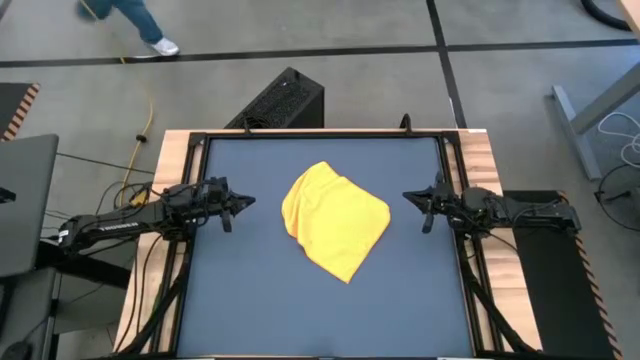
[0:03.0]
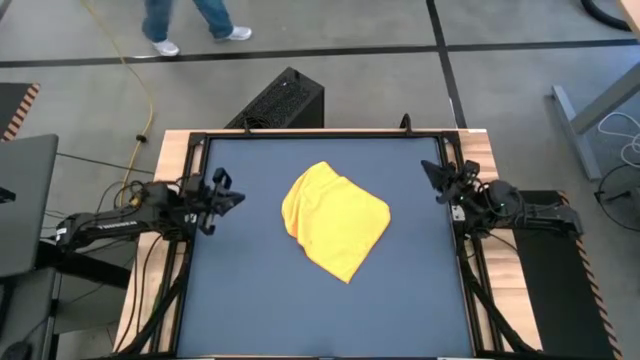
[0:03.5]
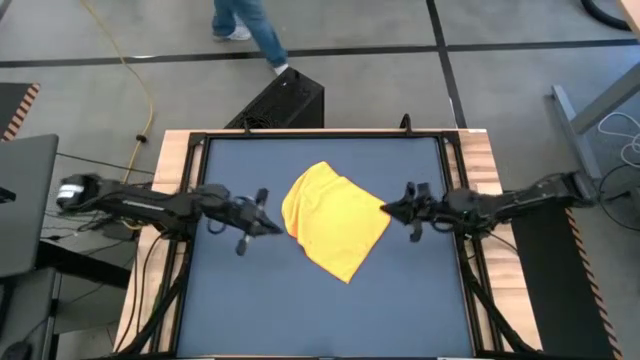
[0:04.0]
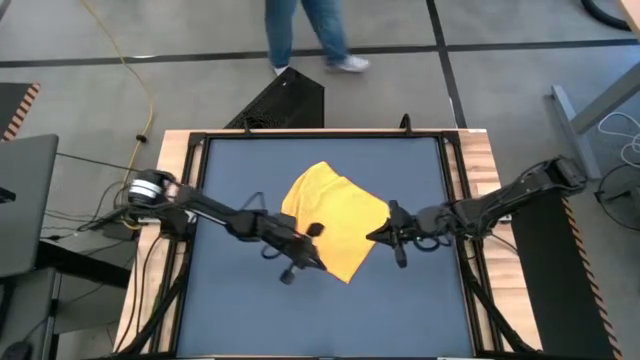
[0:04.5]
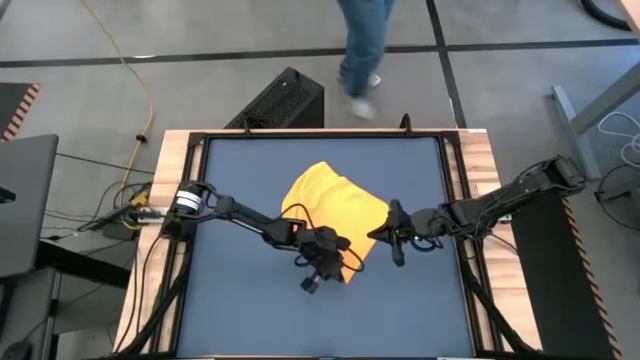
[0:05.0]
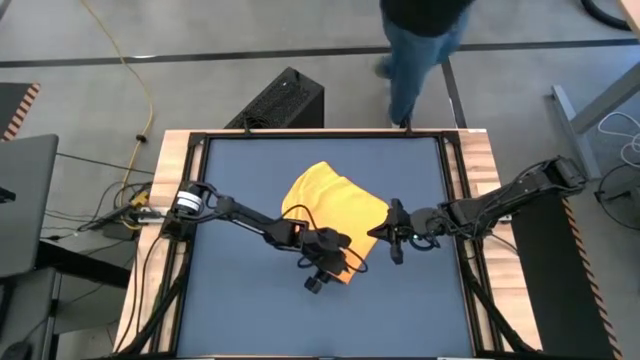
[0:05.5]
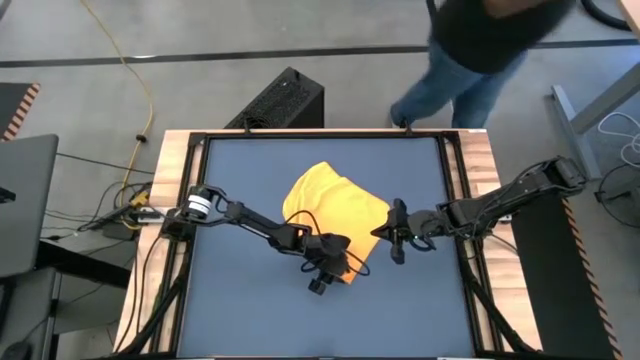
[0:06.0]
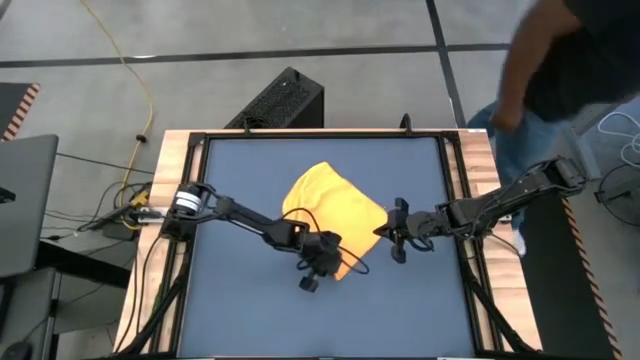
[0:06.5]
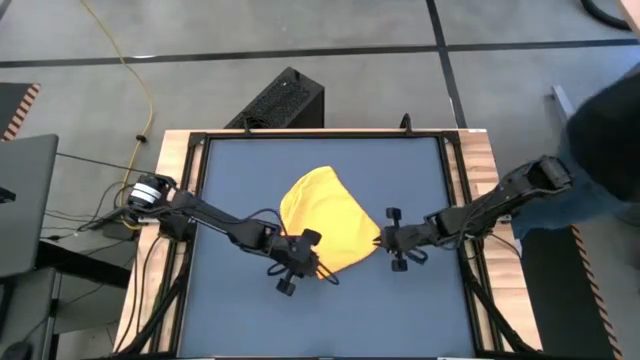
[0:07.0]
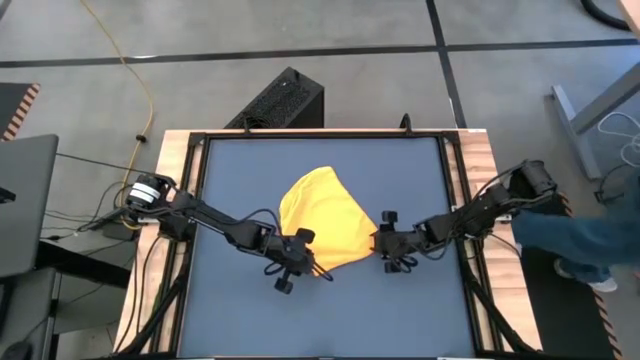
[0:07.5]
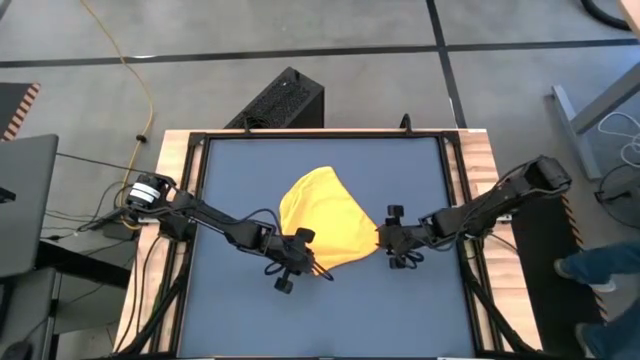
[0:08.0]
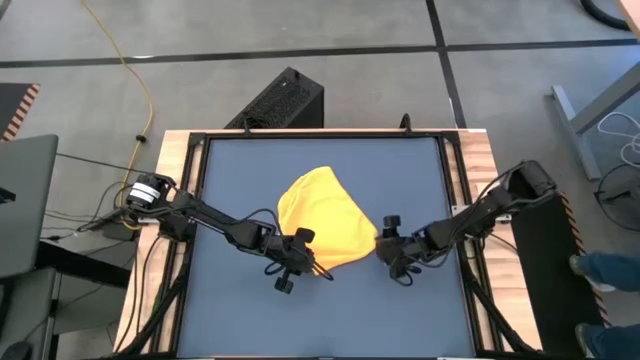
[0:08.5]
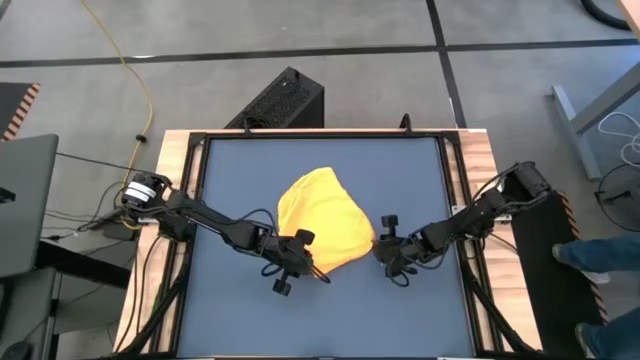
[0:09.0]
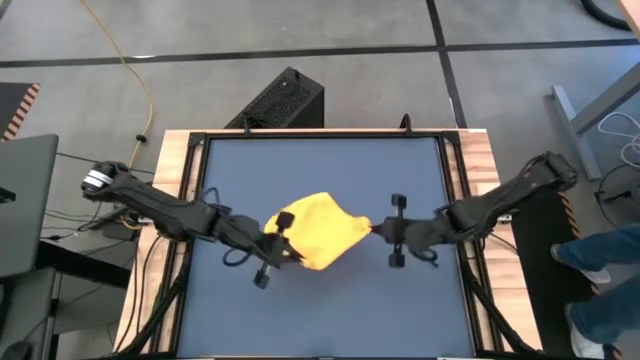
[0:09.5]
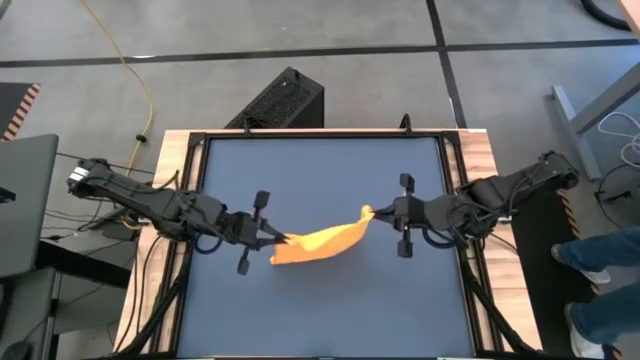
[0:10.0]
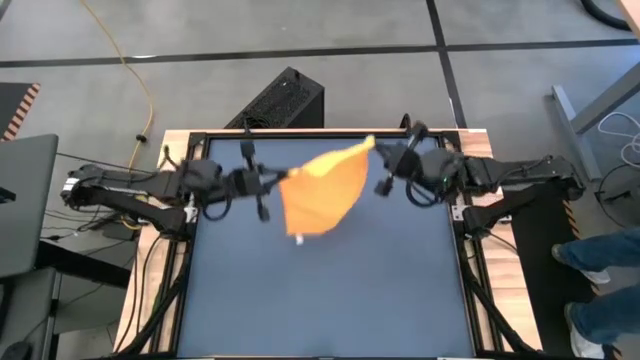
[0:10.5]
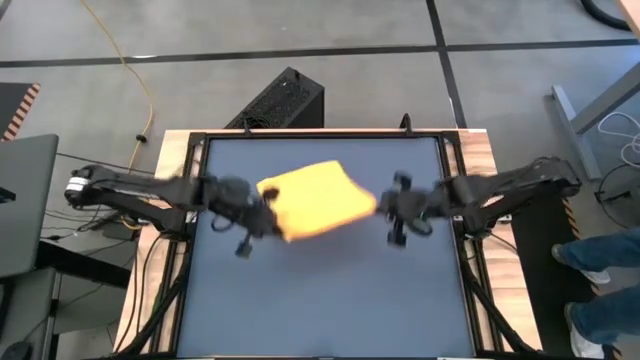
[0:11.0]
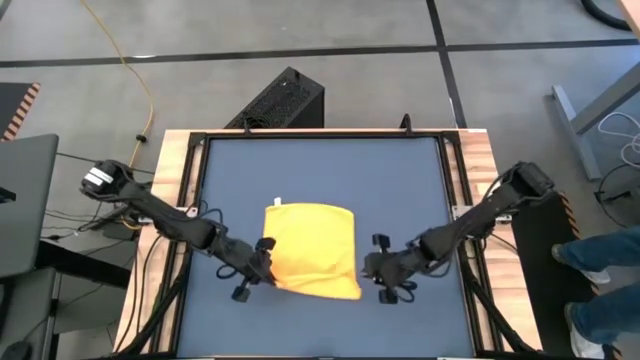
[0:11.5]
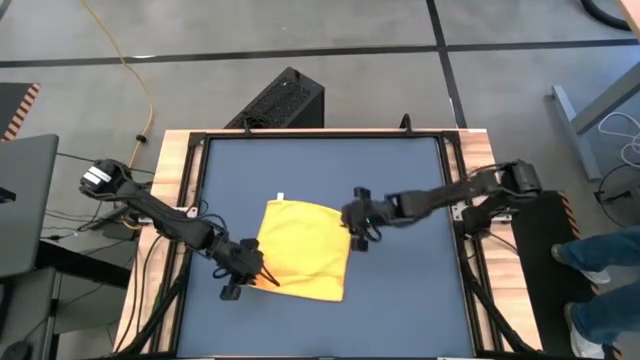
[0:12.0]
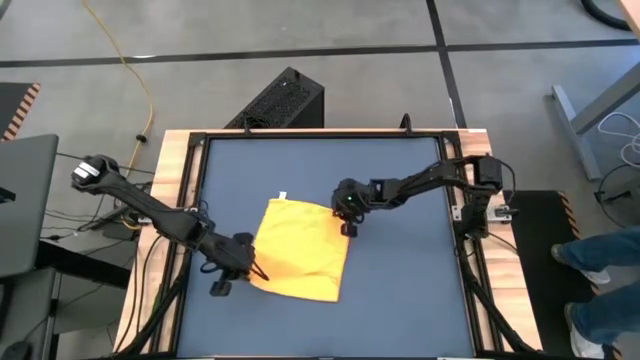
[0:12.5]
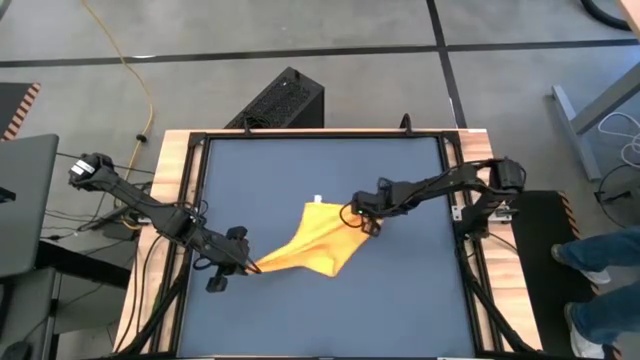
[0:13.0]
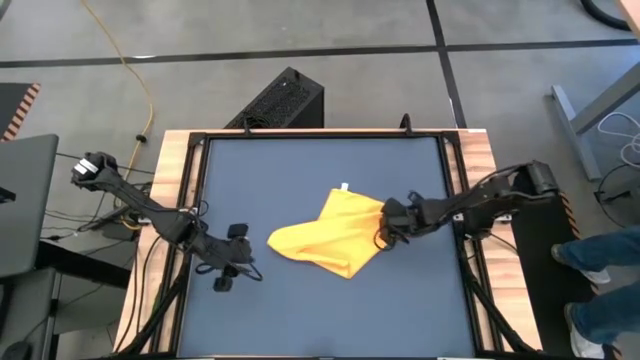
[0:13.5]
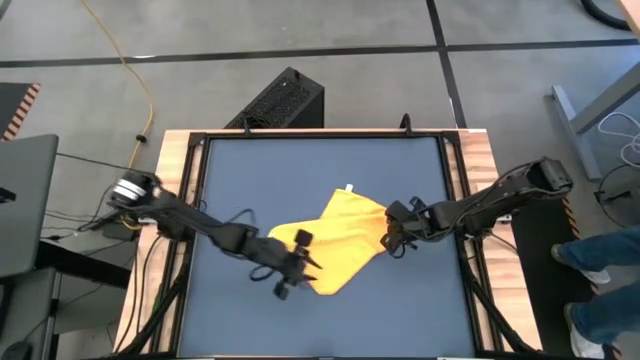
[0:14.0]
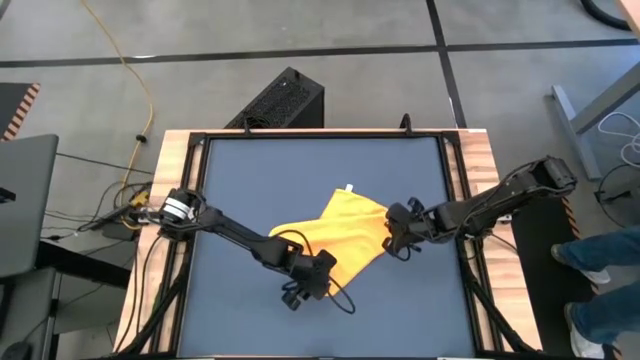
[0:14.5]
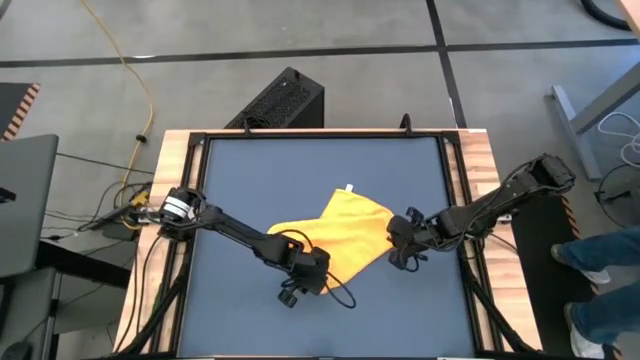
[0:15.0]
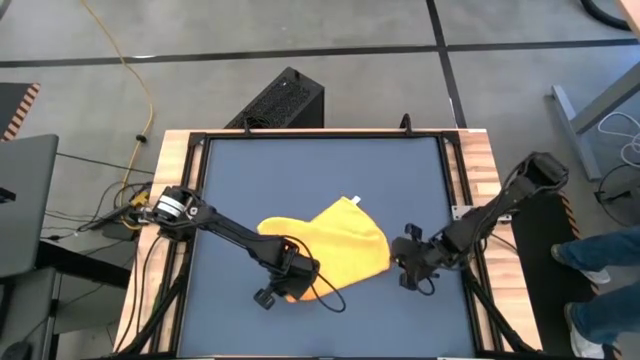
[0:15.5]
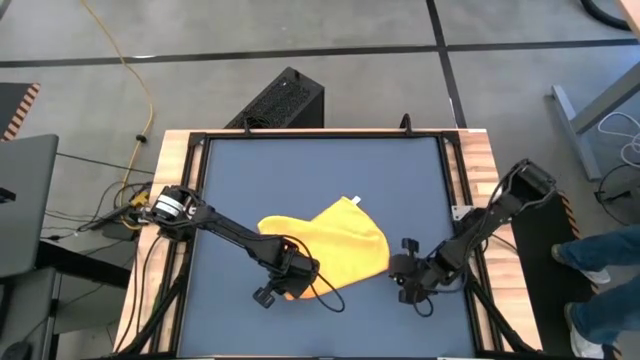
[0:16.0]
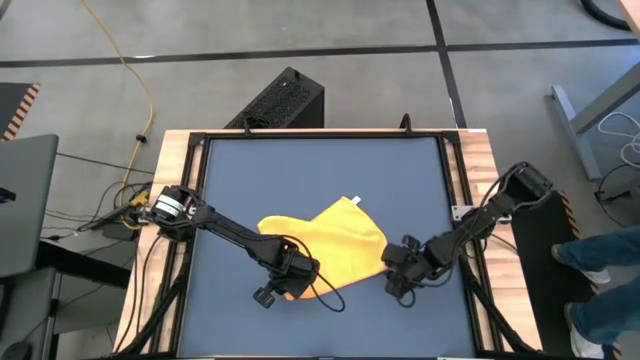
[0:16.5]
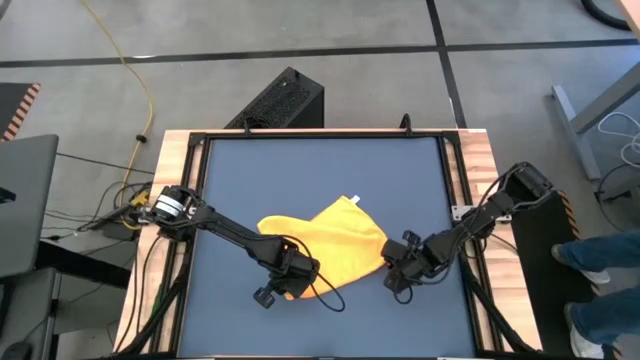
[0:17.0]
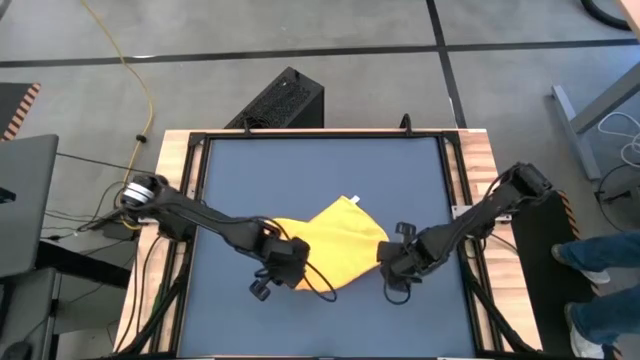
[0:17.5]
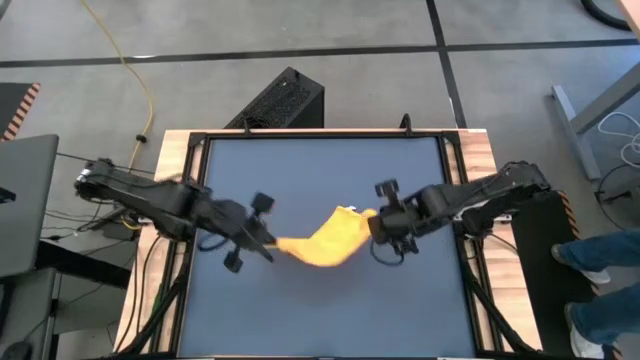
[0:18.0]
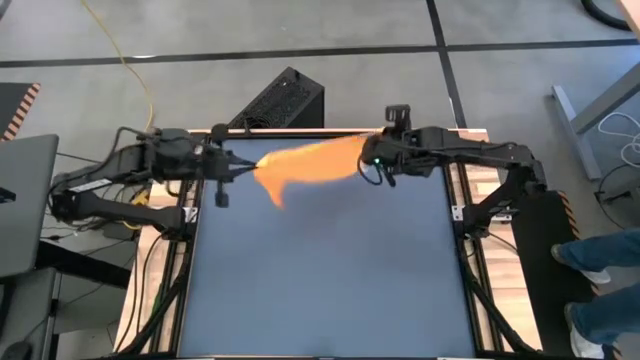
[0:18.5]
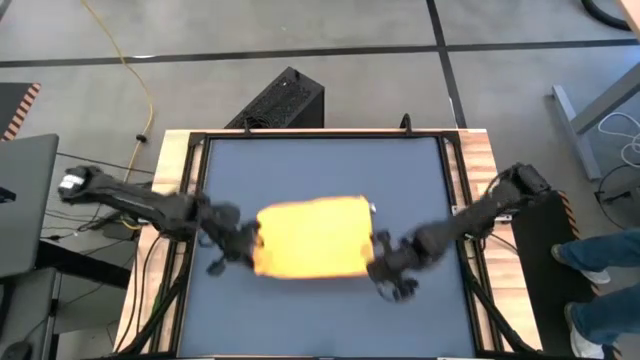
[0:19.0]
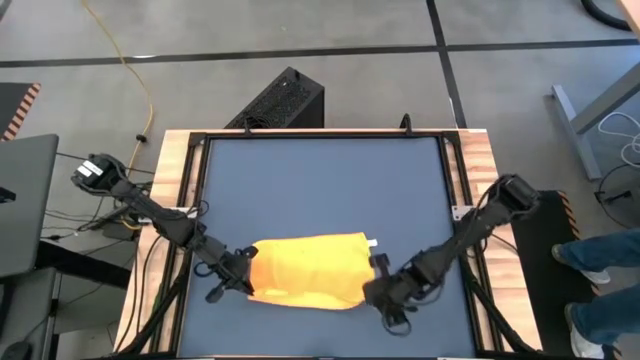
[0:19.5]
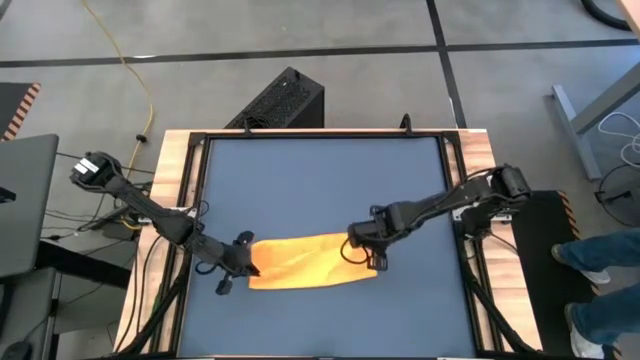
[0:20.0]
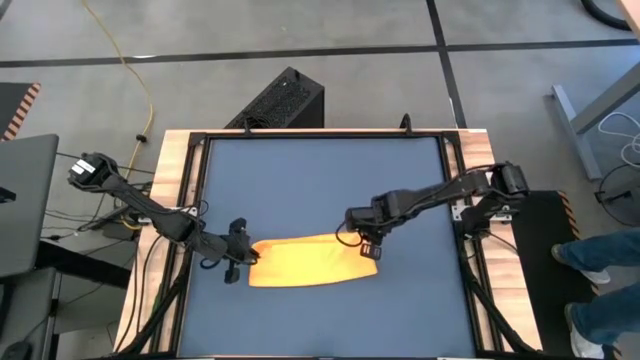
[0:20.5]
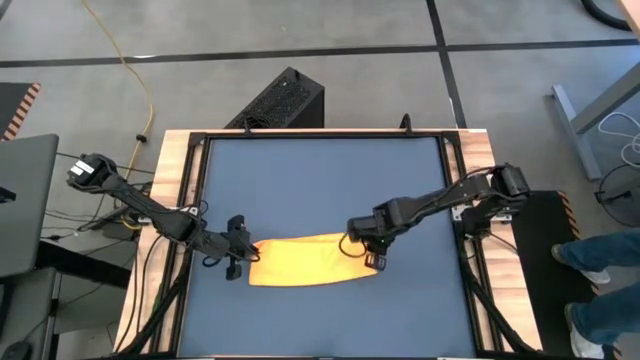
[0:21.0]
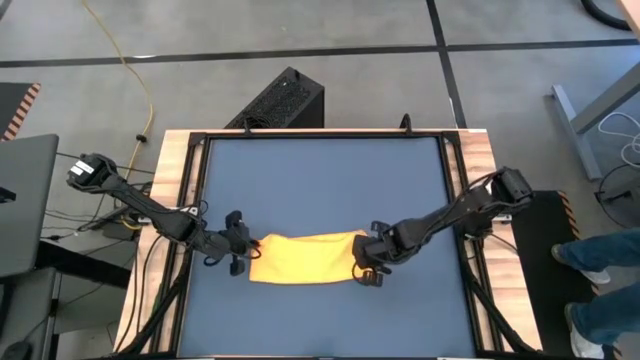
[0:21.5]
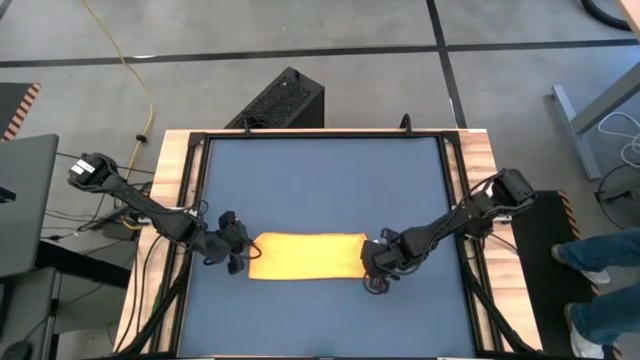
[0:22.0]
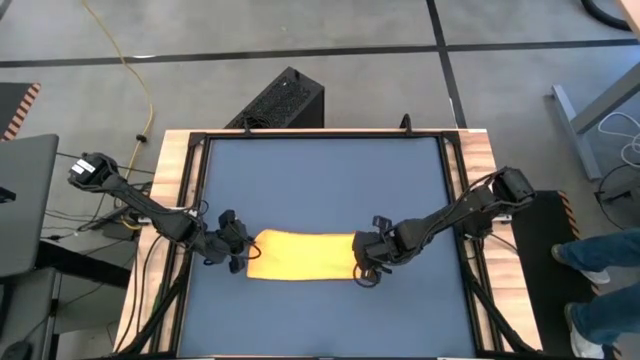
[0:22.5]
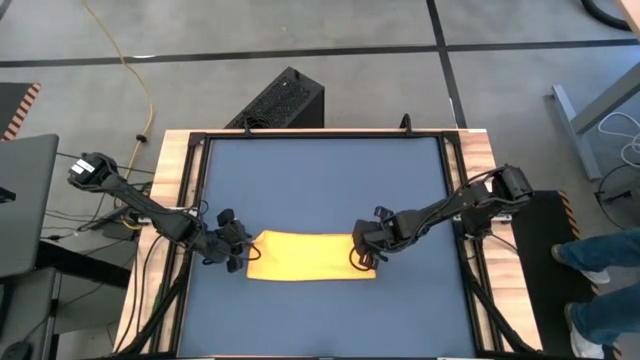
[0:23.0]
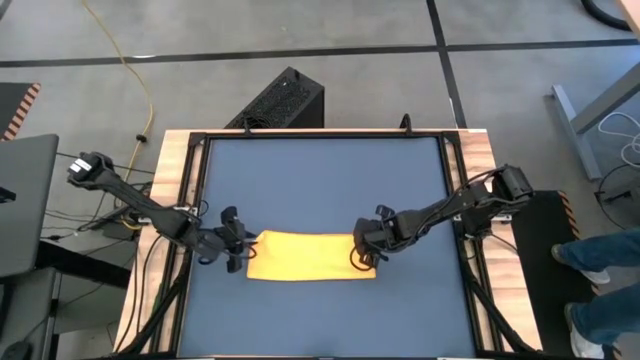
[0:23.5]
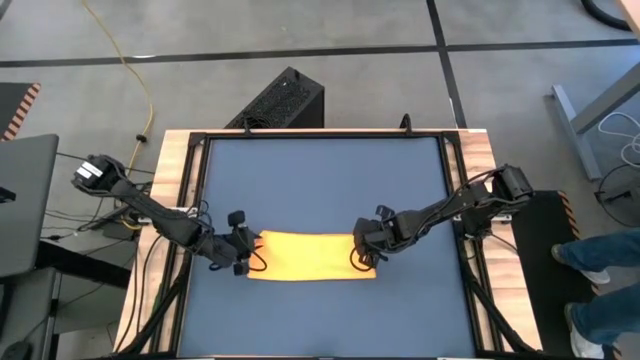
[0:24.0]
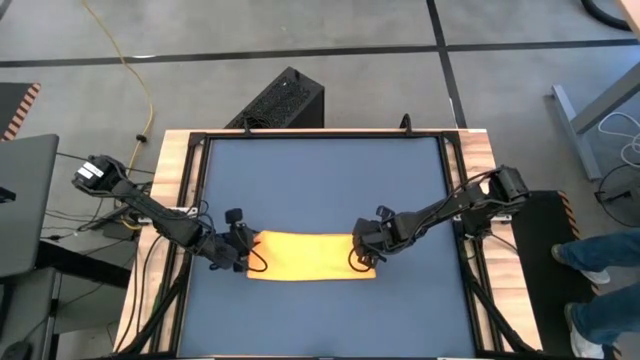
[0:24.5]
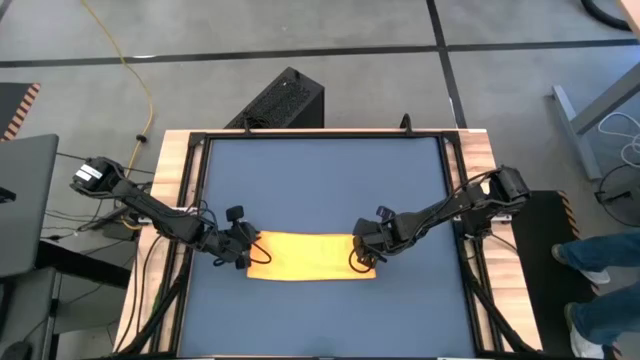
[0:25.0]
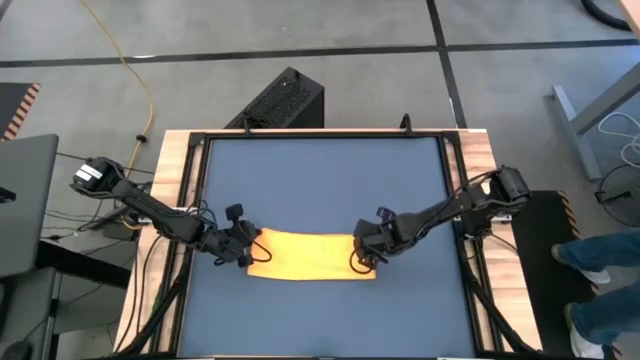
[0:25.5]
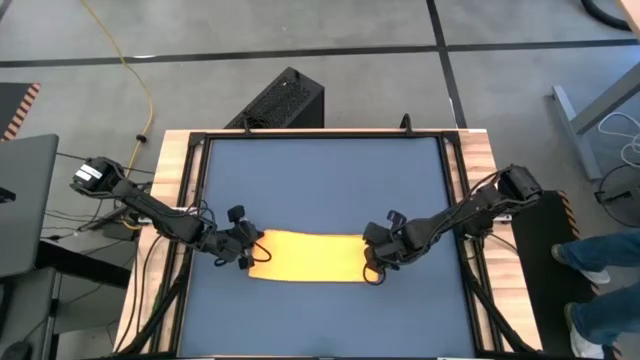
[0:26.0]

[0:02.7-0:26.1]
Task: Roll towel into tight, uniform cylinder
Roll the orange towel
